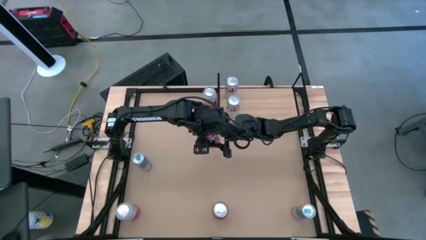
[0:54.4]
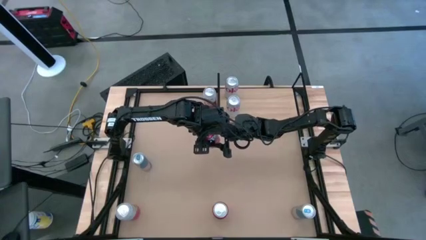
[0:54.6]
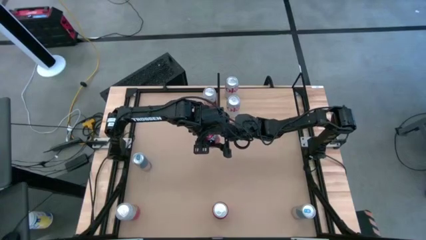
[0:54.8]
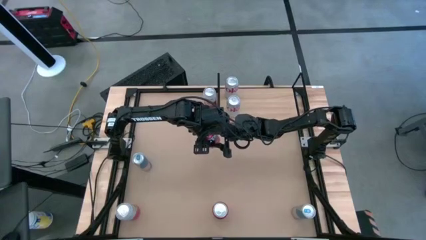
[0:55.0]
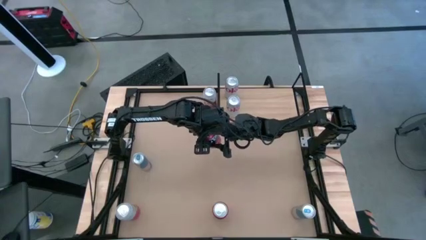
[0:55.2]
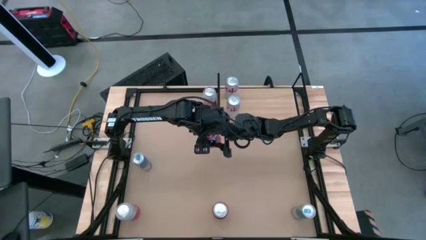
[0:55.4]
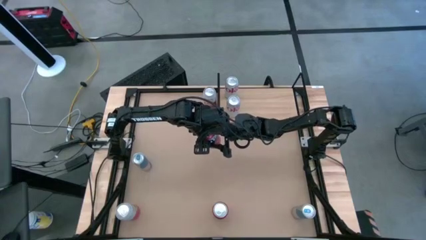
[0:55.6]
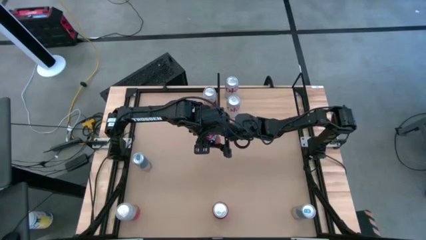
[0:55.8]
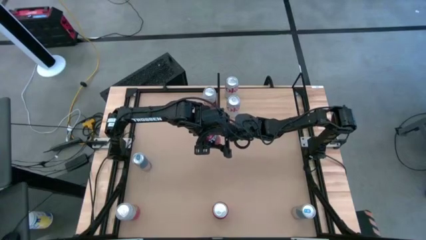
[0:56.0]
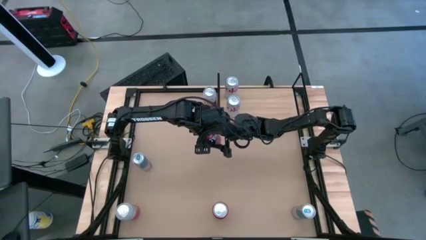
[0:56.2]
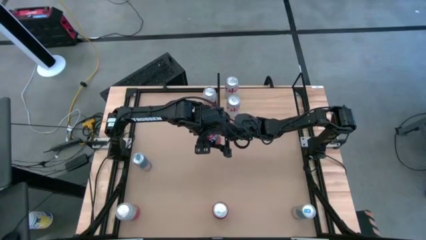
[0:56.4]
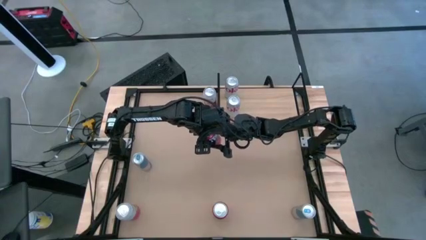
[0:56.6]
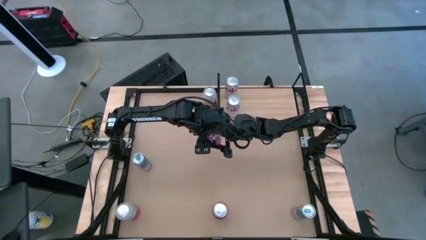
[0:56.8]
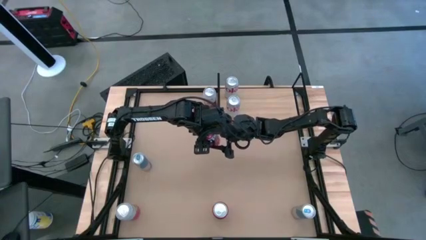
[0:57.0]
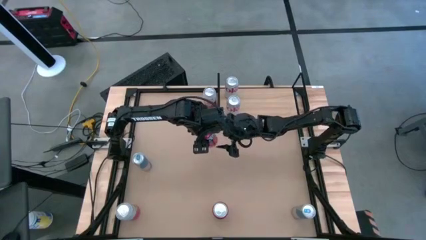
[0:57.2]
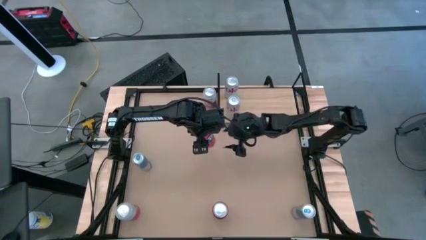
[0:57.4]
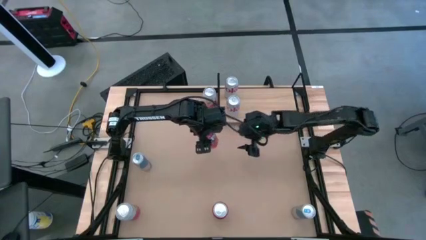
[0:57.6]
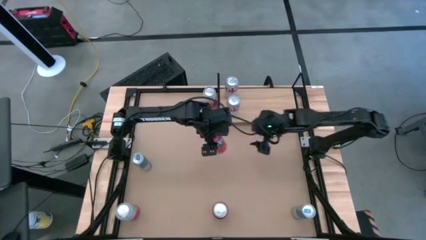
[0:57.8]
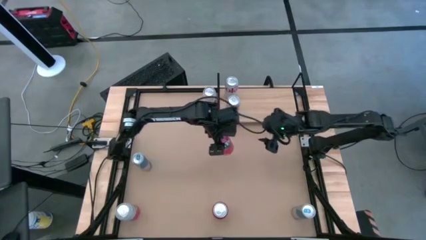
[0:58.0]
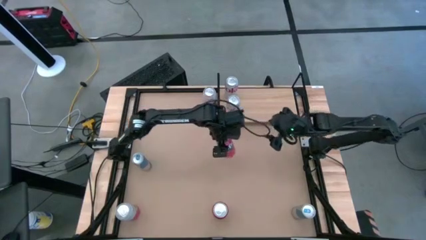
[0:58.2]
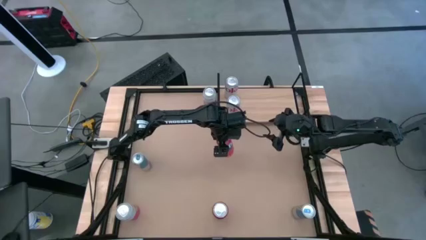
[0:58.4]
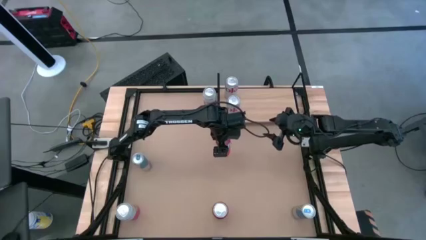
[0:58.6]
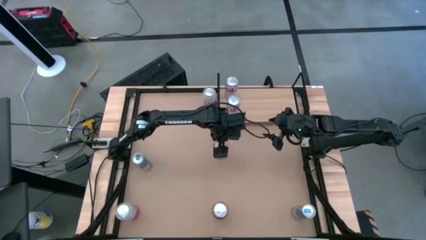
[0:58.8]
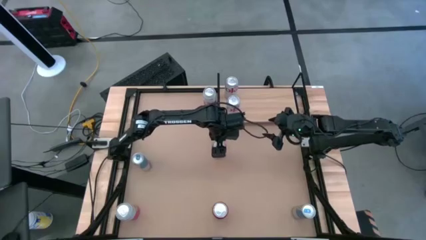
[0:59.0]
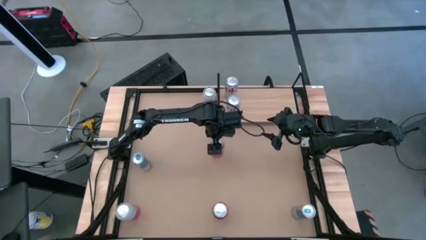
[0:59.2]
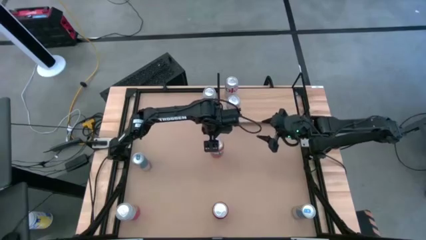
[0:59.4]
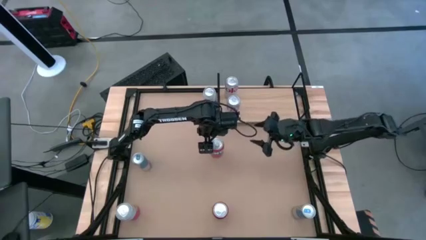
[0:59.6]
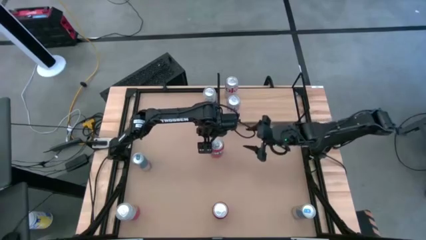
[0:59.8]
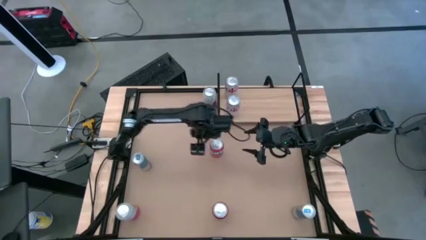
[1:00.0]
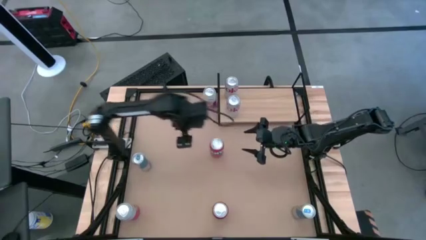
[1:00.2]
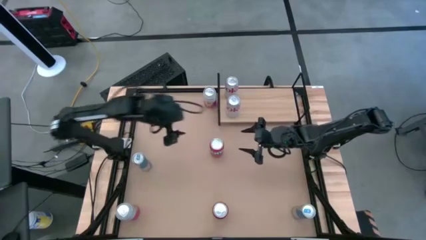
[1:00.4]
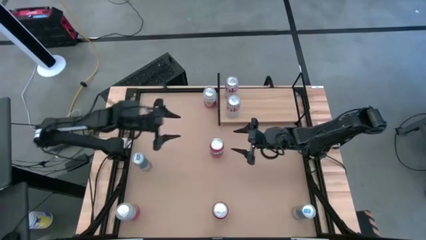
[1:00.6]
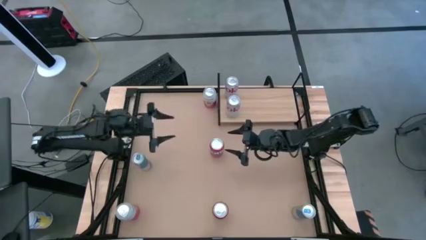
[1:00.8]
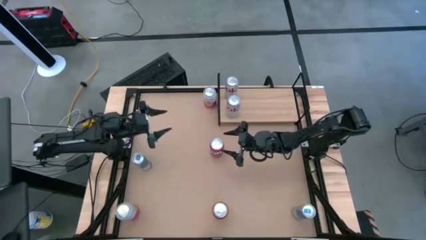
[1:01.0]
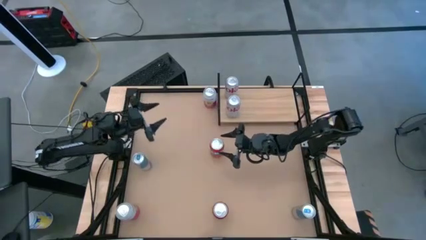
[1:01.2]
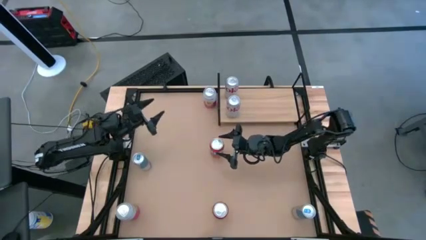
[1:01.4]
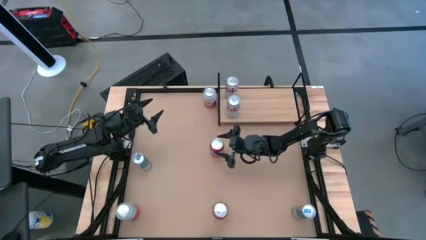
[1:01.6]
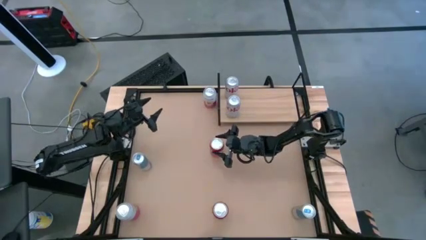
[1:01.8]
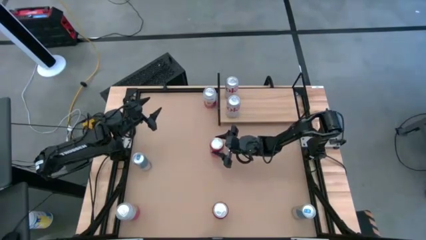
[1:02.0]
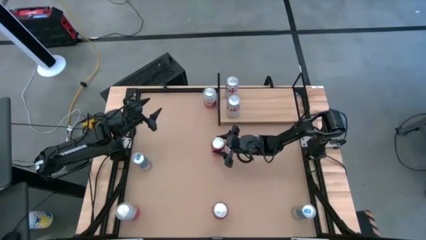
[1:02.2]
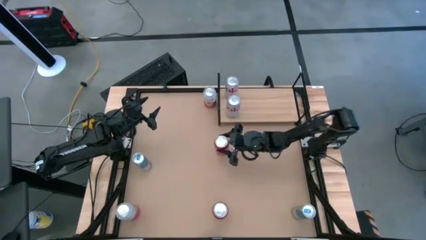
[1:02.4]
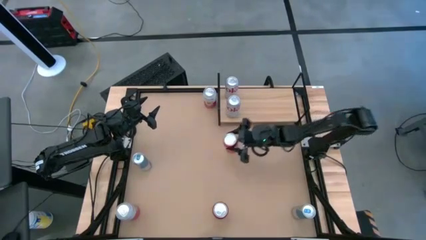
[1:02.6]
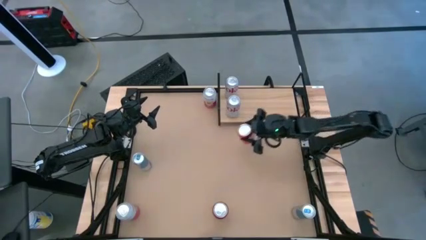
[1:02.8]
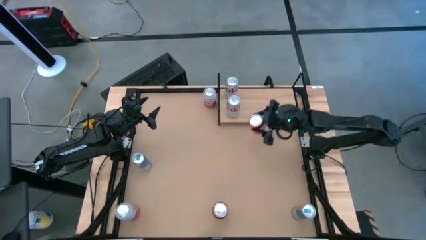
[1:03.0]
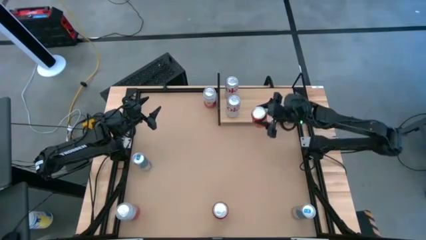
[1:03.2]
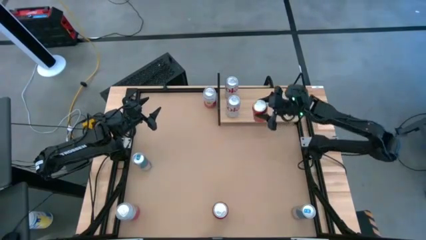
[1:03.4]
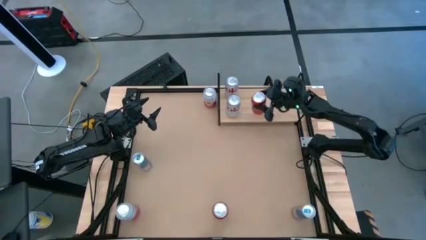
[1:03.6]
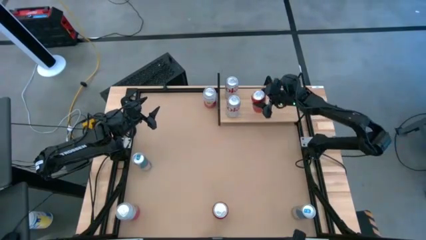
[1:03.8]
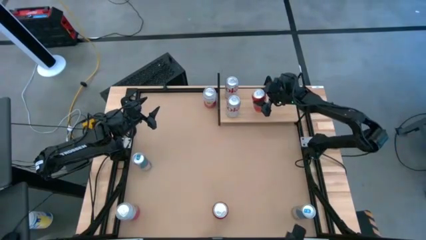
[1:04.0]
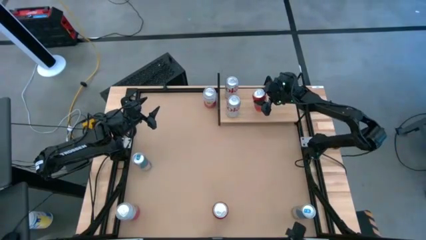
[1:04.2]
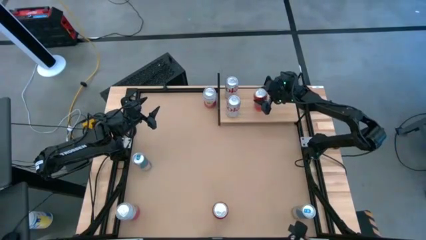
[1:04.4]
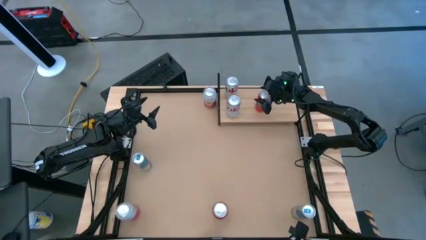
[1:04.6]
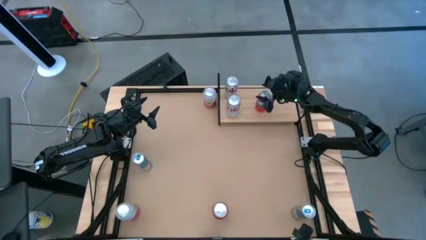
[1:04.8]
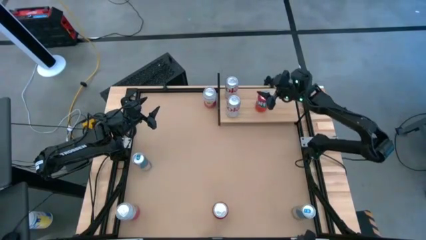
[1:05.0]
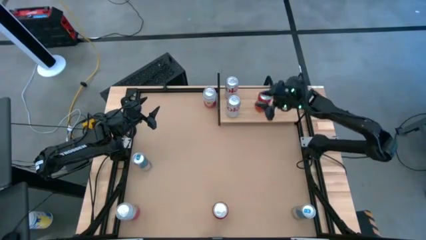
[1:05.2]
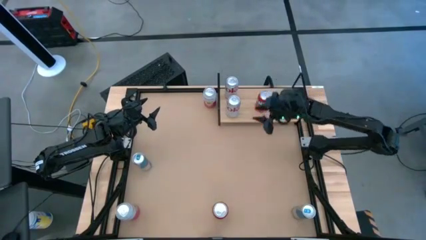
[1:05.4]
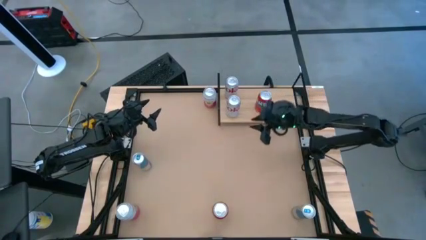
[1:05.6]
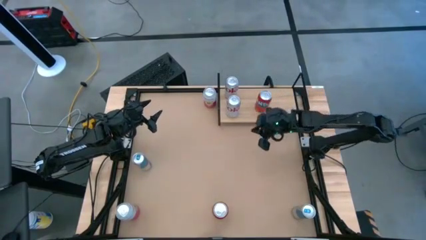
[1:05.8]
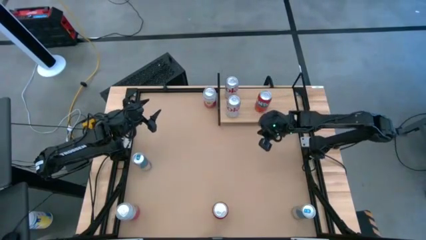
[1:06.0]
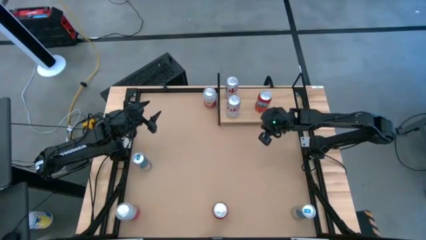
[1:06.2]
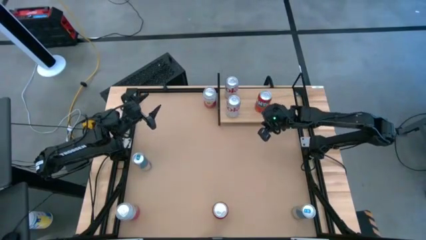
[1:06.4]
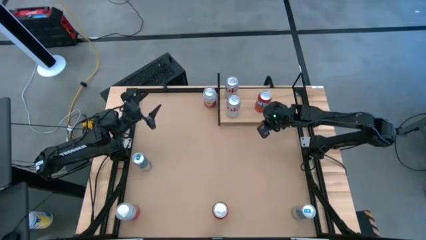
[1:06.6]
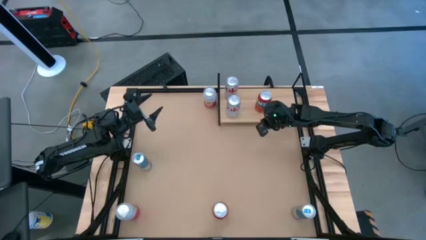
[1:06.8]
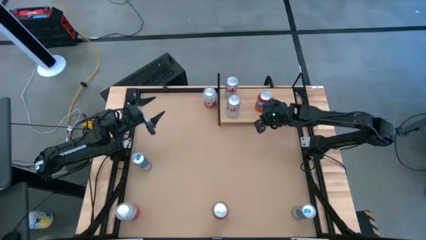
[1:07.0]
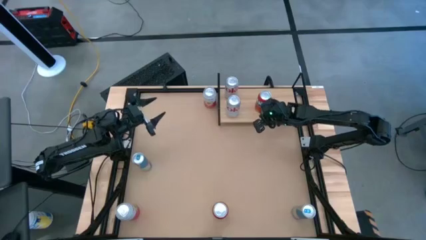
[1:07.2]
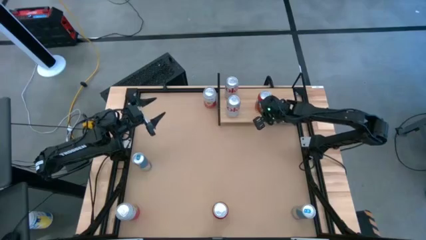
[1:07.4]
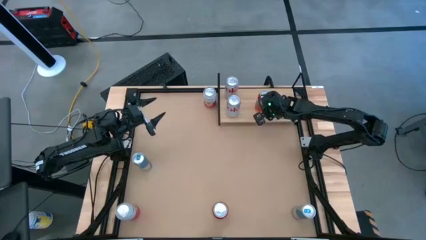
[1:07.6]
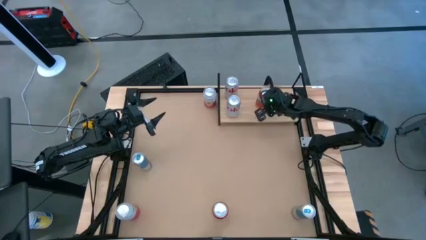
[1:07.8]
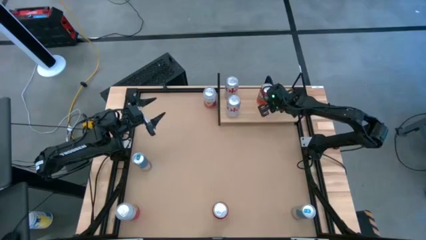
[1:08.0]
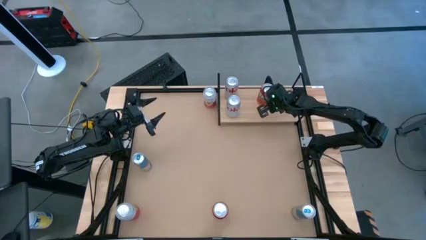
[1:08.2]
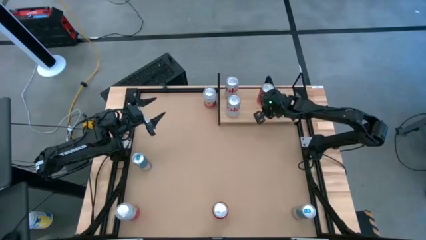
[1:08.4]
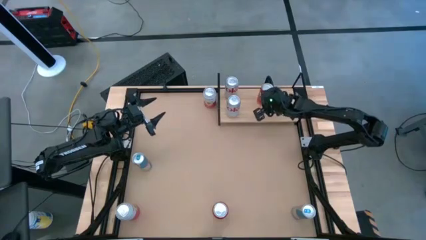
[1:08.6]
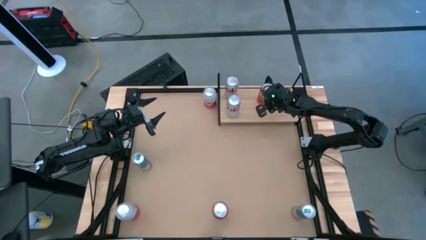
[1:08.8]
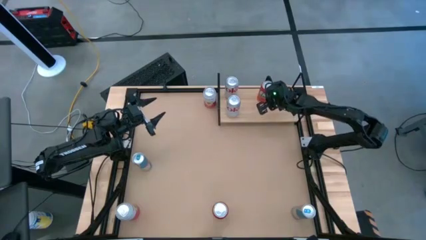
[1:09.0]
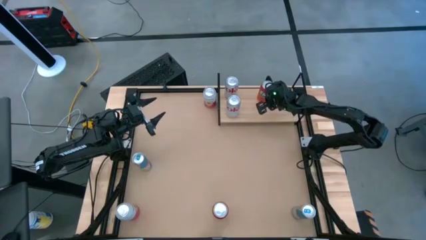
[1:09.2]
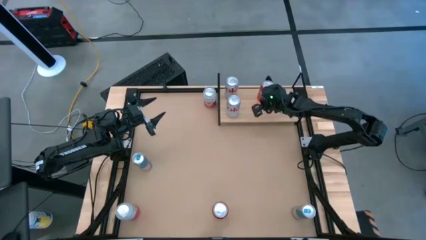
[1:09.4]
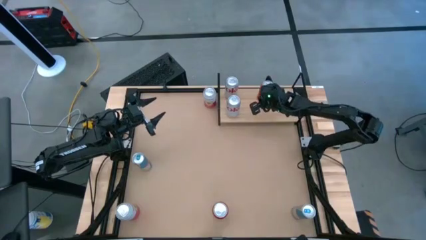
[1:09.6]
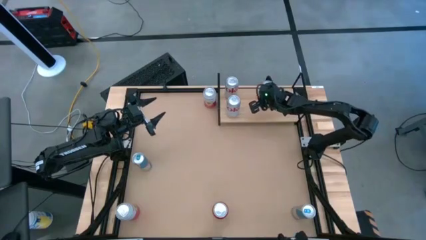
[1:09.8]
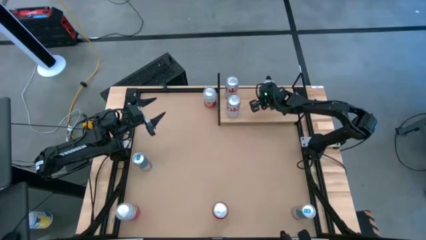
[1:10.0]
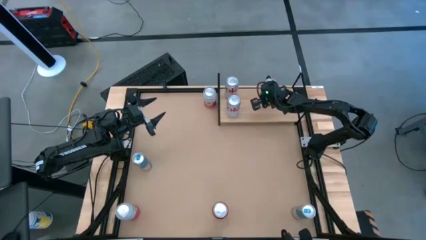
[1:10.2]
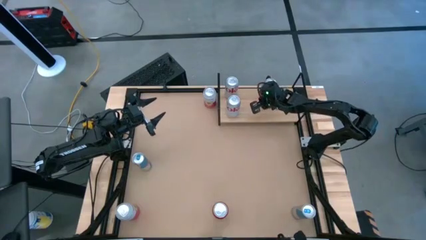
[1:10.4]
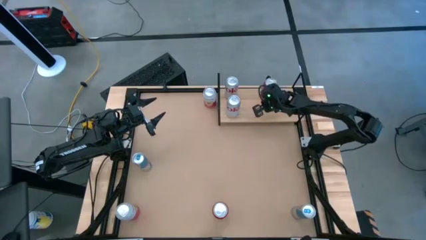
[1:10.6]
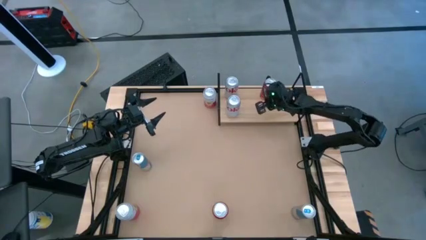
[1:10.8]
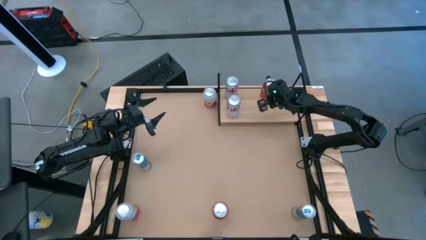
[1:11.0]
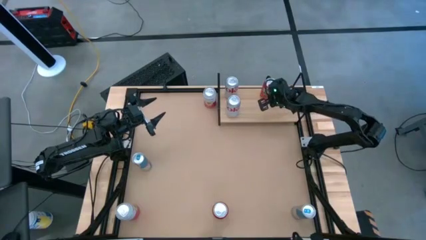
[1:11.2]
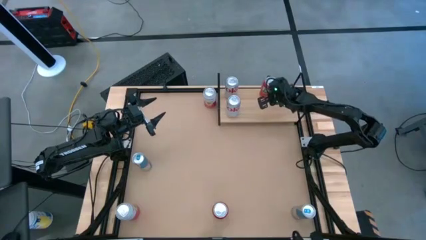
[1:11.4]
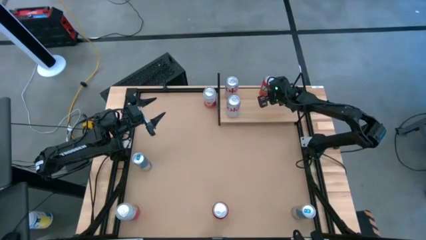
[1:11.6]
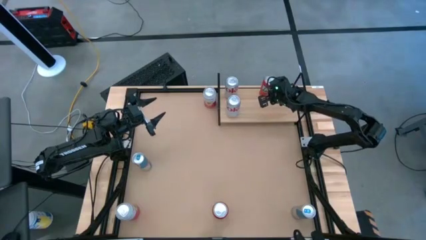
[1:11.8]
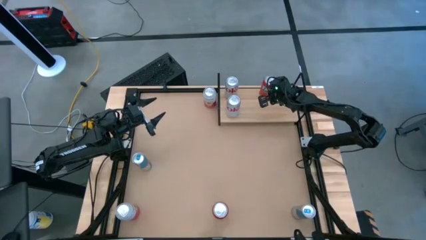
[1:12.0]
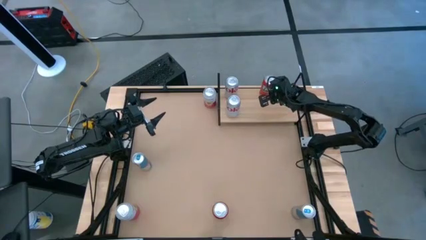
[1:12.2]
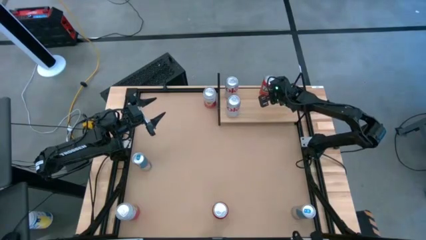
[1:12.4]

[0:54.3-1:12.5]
Task: Place canned beverage on shelf
Put the top orange soda can on the shelf
